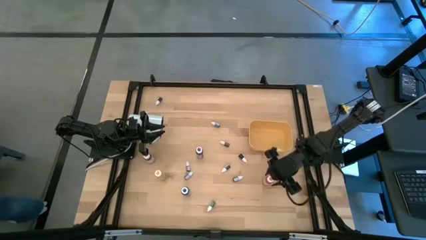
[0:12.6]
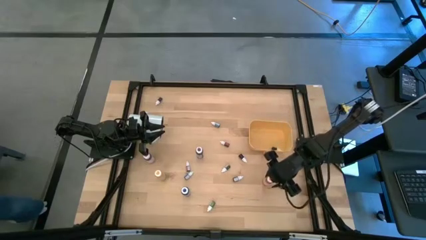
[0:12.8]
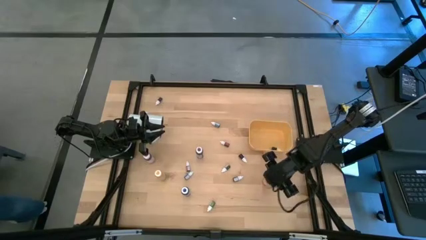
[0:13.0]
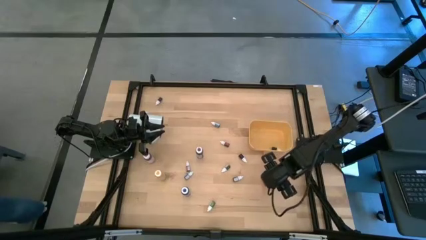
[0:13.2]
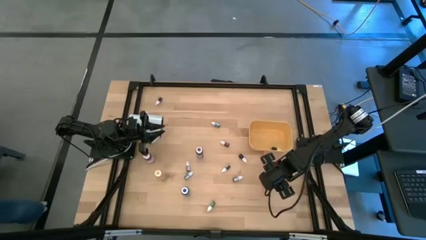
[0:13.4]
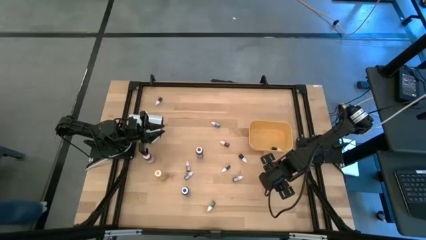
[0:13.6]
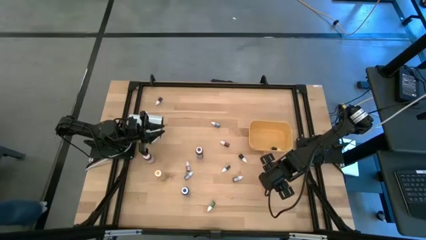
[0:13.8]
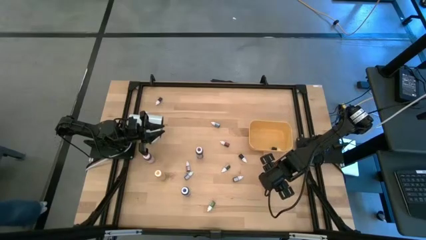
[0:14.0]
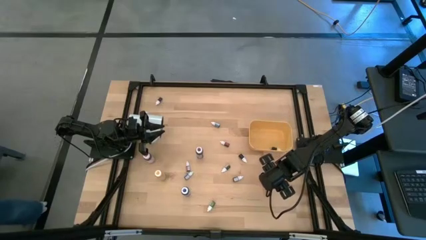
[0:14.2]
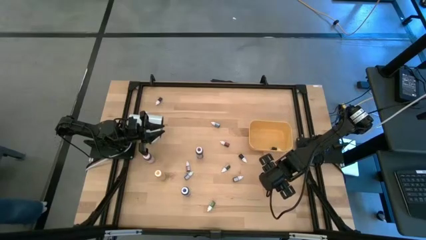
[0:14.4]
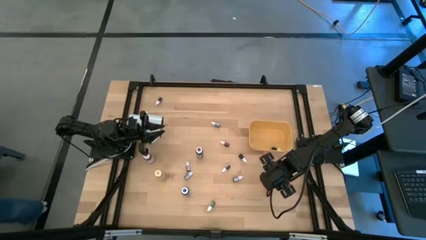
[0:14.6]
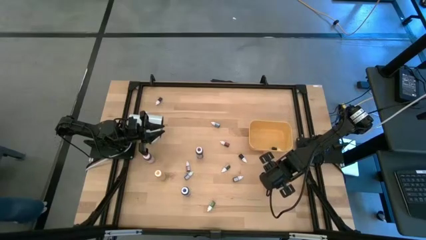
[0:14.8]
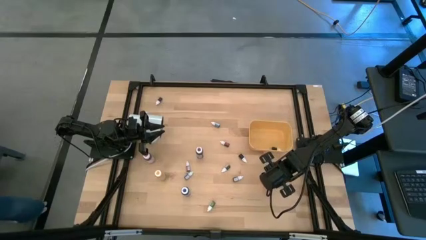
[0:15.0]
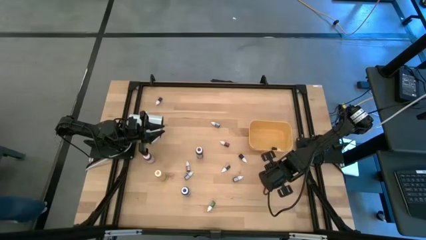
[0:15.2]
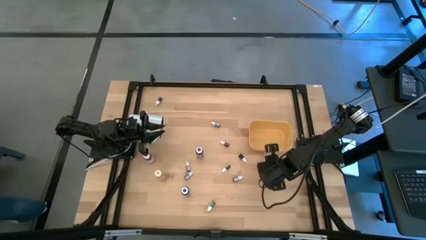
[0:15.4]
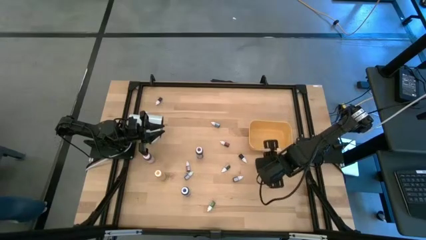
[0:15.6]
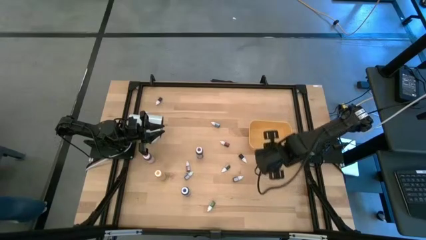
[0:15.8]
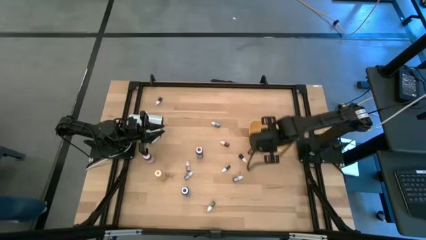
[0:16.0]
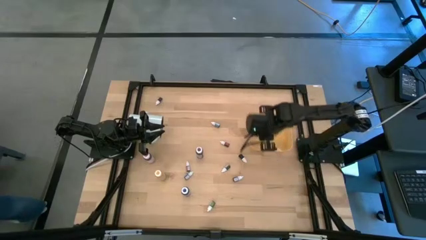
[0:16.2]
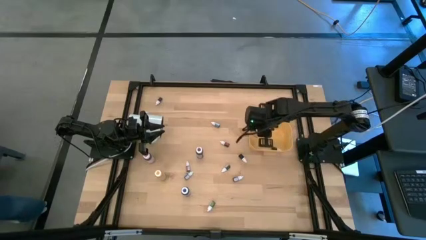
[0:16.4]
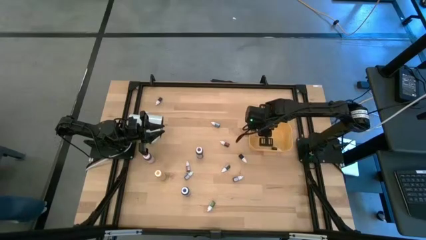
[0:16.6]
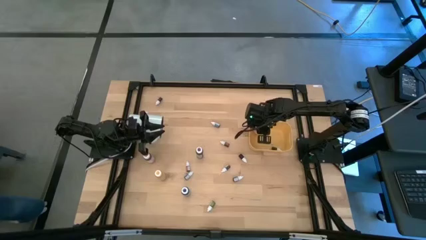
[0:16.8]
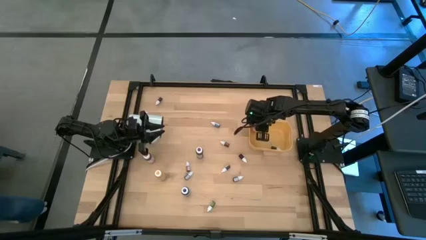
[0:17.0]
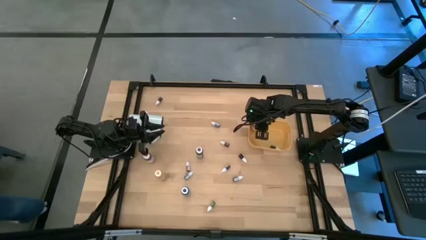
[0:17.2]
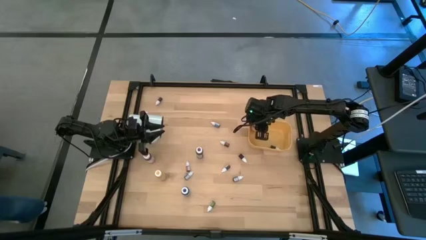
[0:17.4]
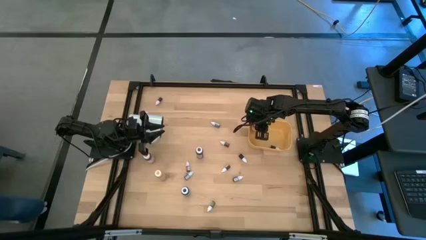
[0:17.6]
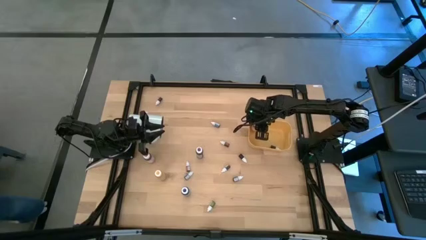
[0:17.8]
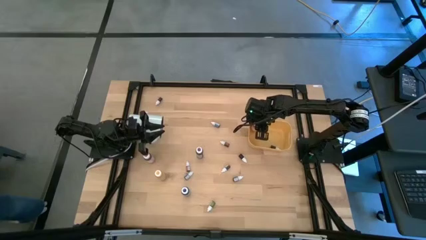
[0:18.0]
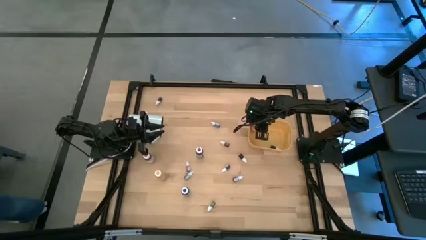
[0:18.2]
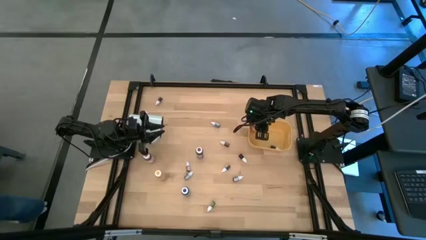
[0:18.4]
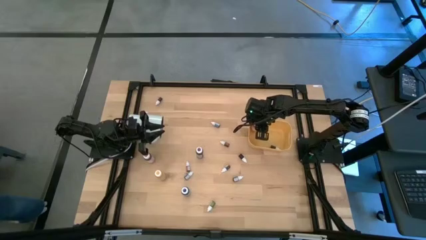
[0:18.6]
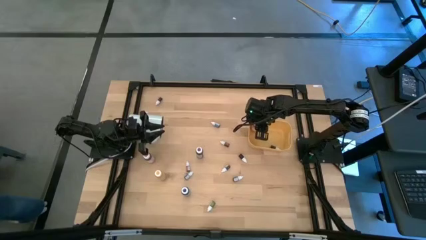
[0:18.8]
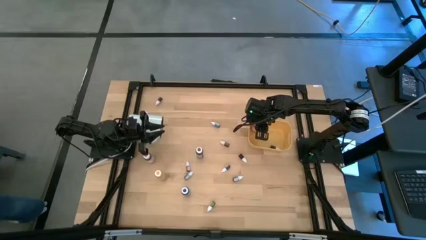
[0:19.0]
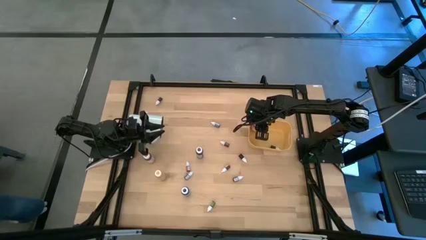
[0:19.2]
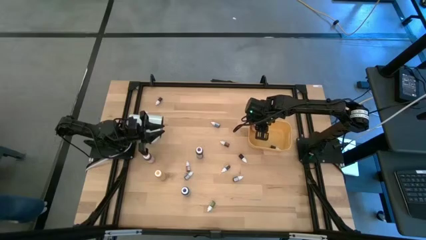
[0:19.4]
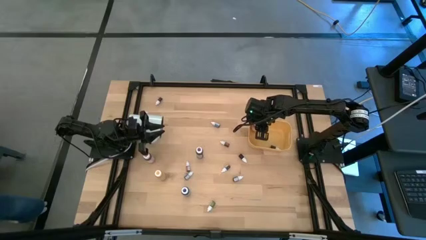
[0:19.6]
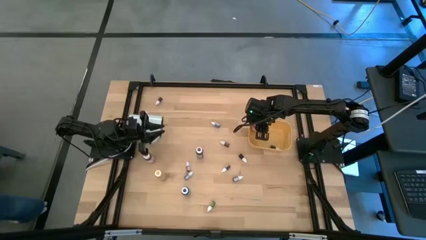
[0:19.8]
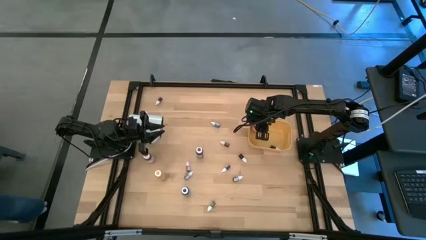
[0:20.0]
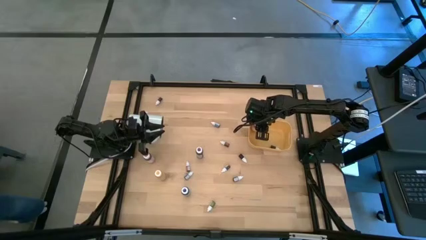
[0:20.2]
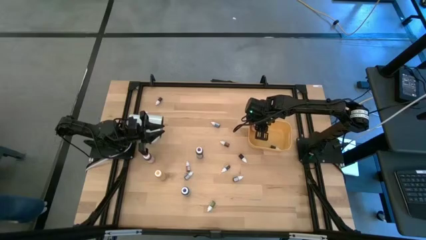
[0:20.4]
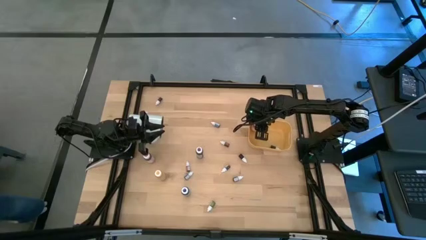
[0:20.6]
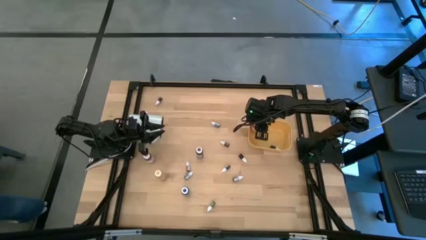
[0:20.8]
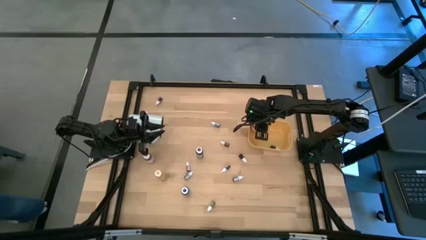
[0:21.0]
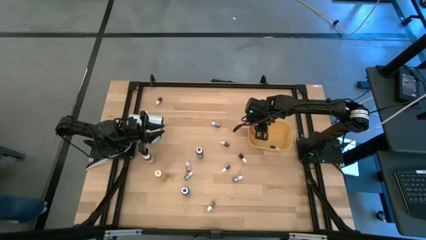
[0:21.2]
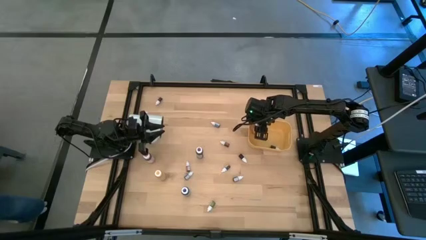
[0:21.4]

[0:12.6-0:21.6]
Task: Pick & Place food coloring
Put the orange food coloring into the yellow bin

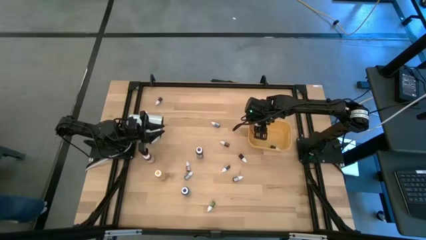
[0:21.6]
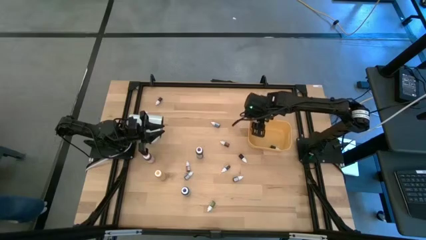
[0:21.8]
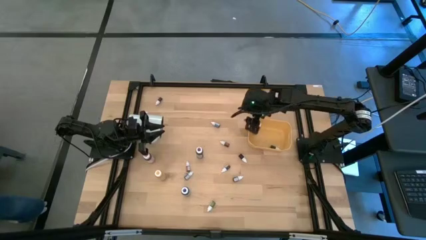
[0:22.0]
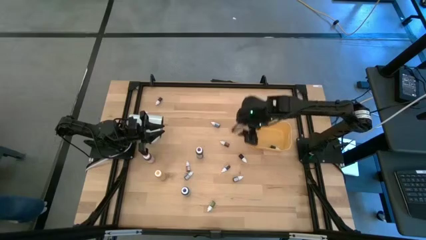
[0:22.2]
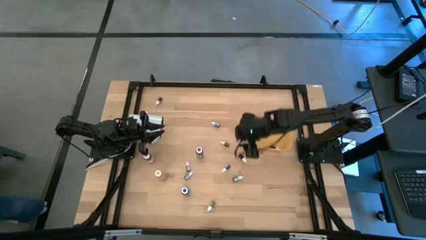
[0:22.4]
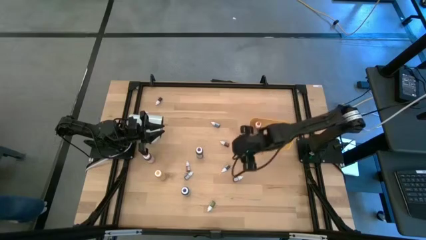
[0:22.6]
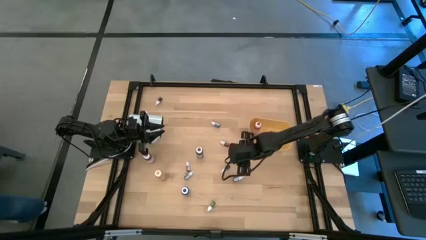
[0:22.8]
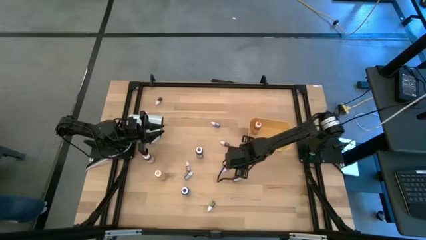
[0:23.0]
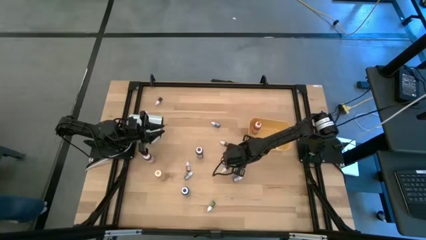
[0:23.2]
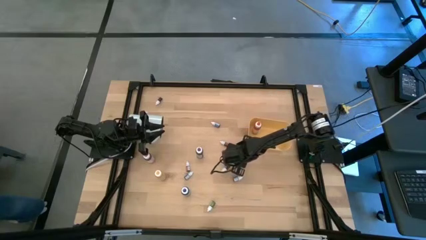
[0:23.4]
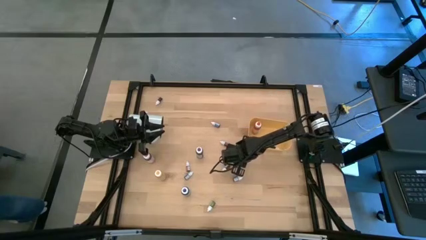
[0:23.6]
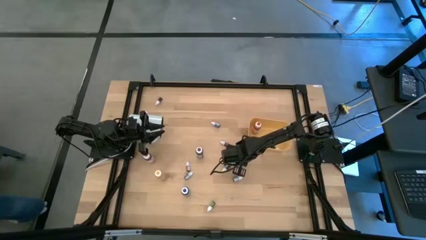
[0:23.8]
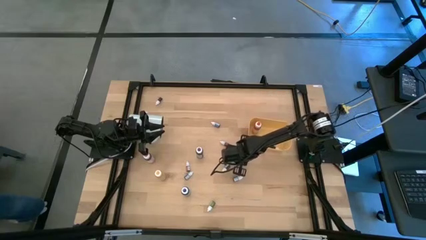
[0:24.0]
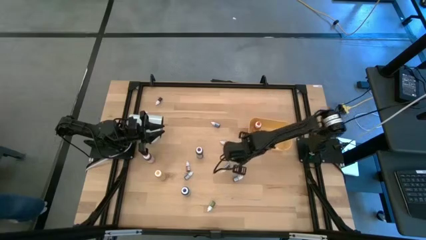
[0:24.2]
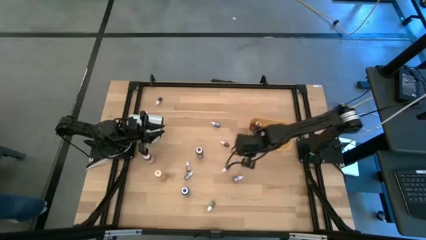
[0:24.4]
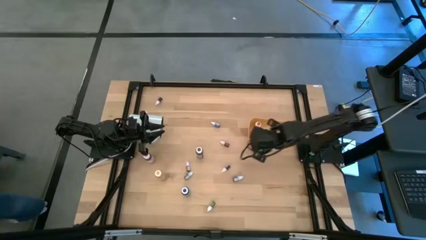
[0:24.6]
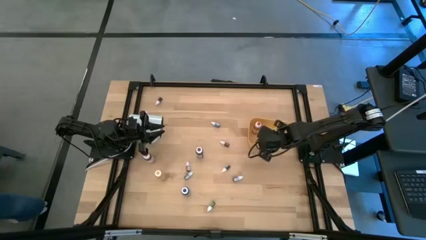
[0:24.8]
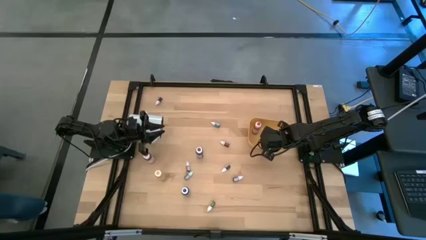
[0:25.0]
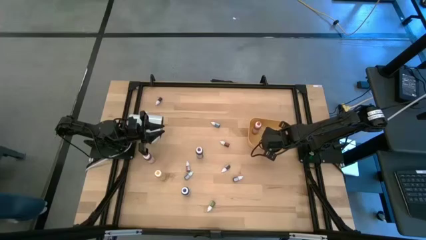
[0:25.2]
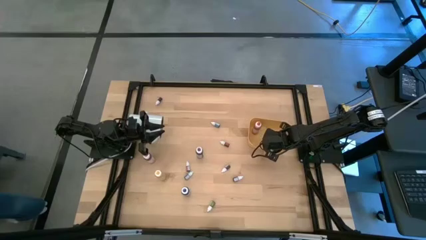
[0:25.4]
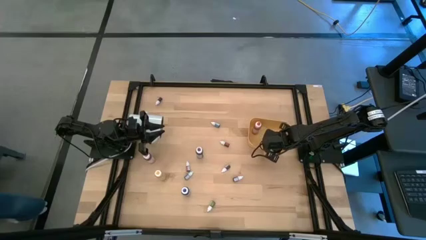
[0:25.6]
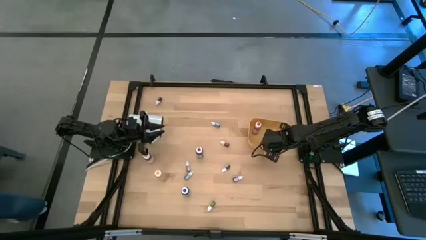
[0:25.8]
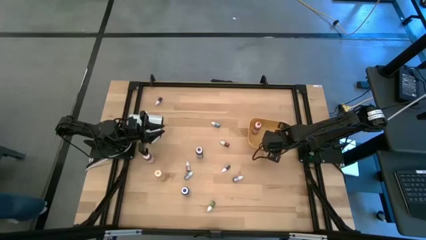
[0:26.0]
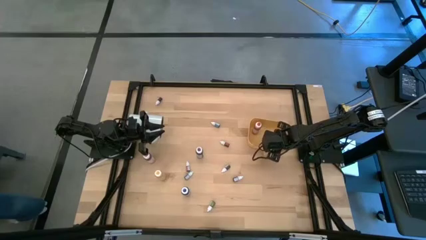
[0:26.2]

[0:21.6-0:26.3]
Put the red food coloring bottle into the yellow bin

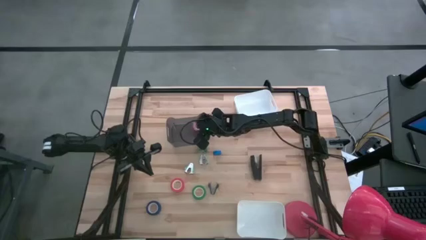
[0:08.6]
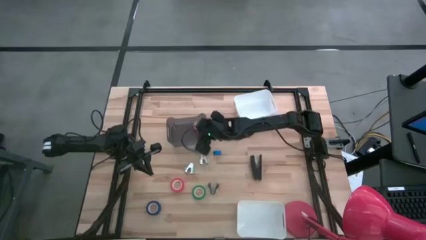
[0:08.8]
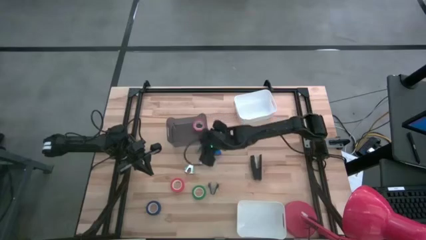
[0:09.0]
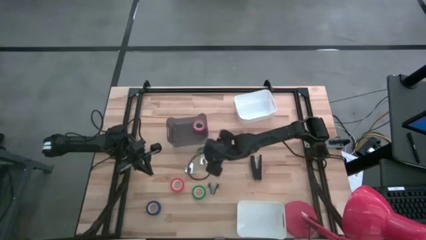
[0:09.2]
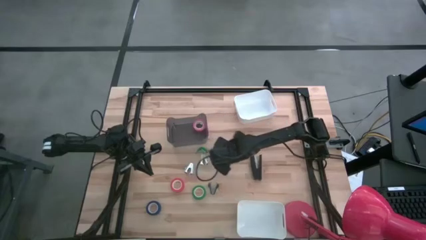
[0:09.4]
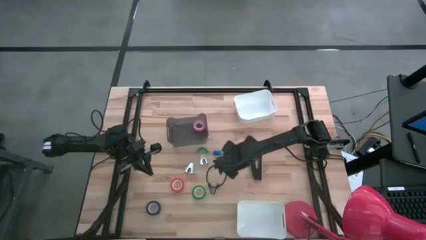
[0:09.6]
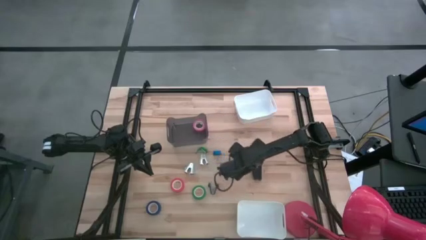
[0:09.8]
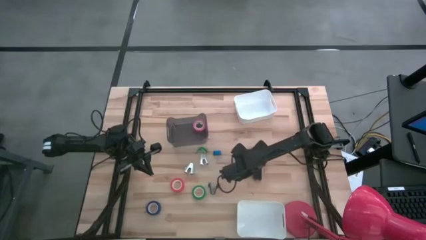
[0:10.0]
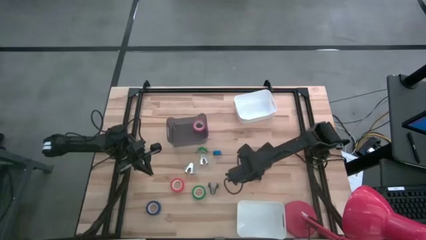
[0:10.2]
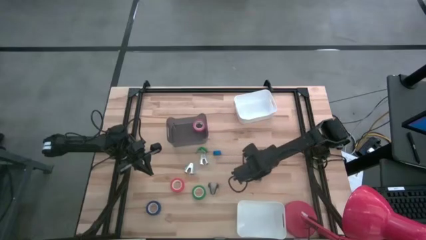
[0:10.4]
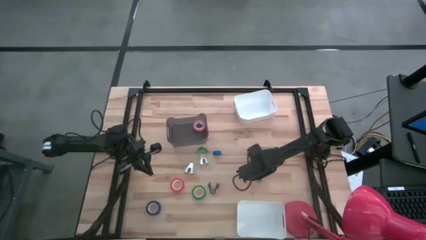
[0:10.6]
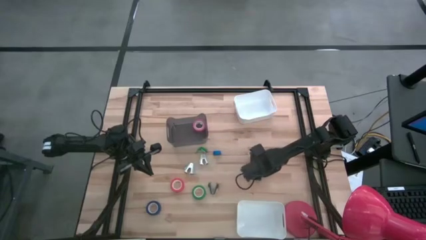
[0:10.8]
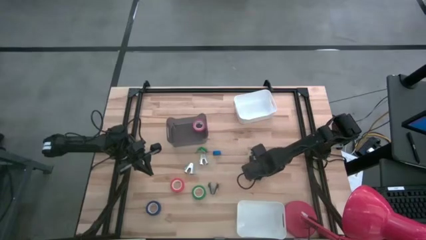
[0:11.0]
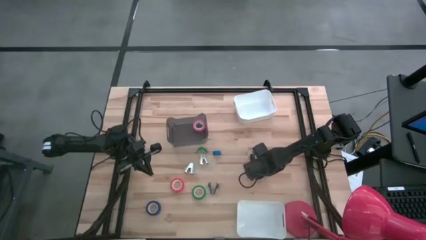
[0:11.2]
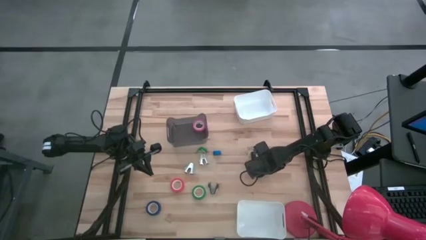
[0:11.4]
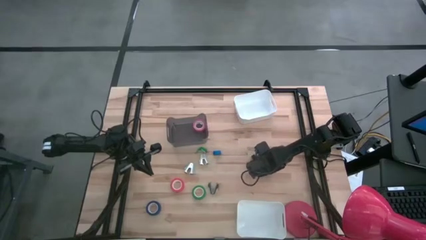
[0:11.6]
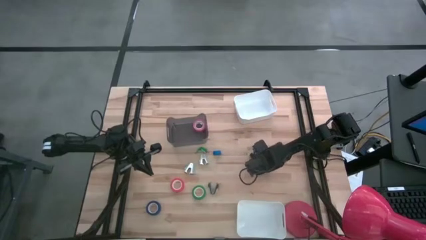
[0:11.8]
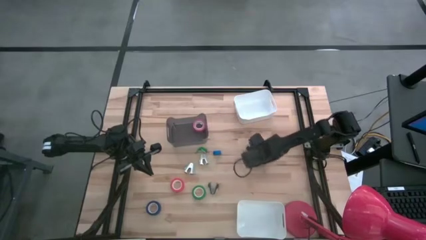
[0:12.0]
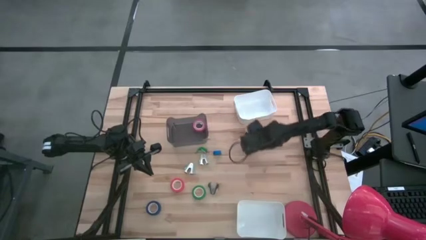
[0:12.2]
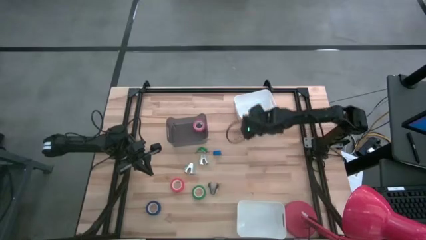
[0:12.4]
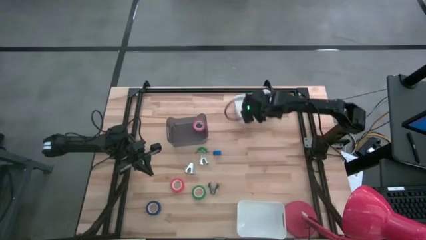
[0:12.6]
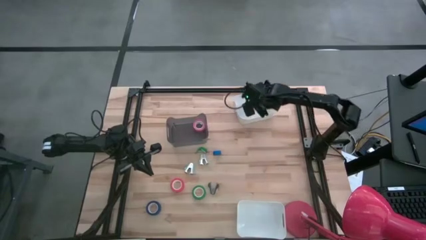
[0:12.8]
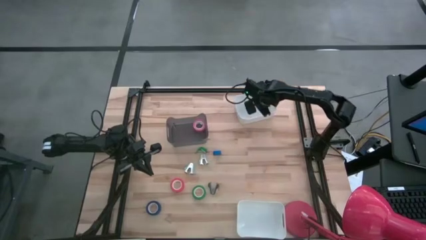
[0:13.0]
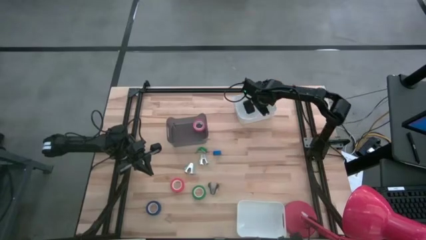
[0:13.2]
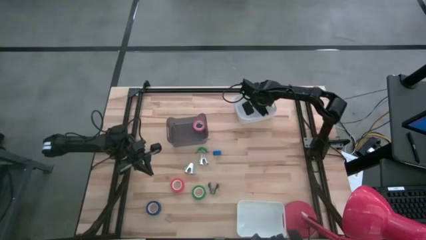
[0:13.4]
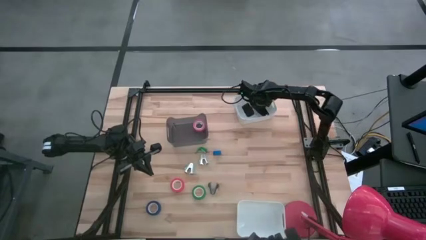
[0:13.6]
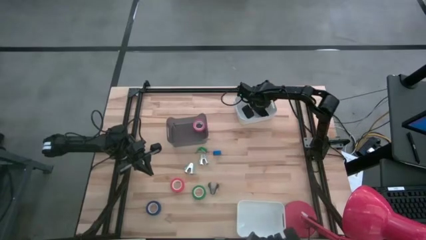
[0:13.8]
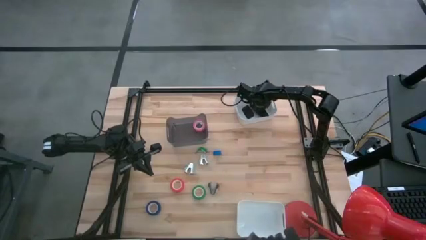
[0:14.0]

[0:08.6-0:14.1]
Task: Pick and place Stapler, Stapler remover, tape
Put the black stapler into the top white bin
